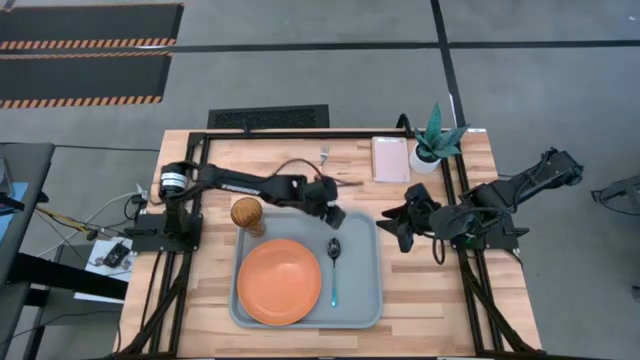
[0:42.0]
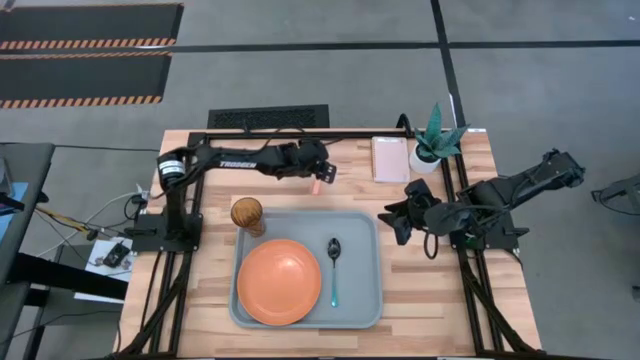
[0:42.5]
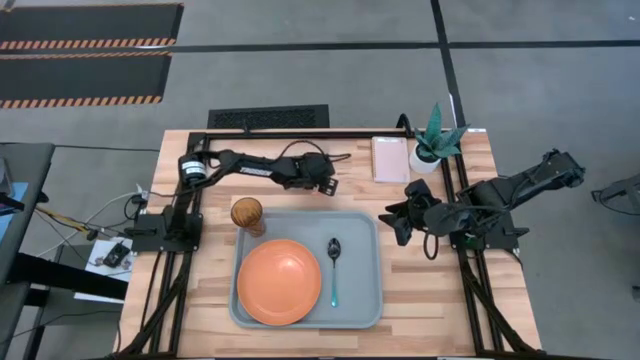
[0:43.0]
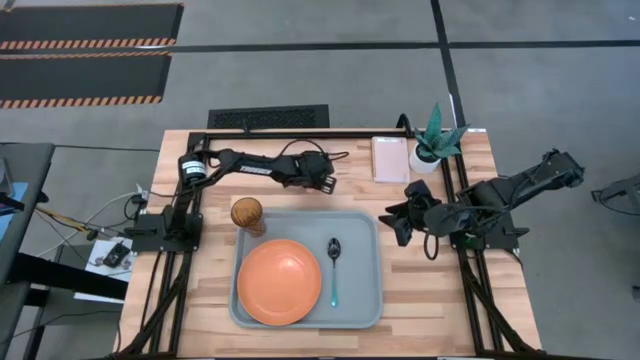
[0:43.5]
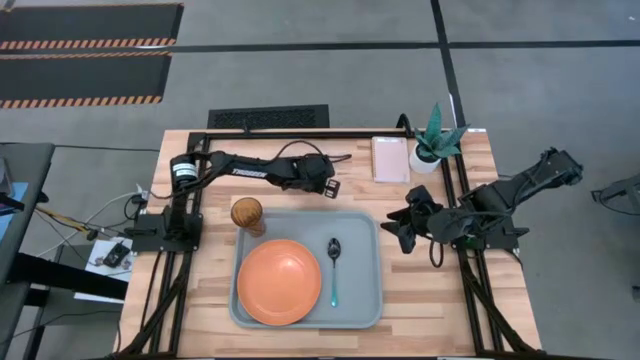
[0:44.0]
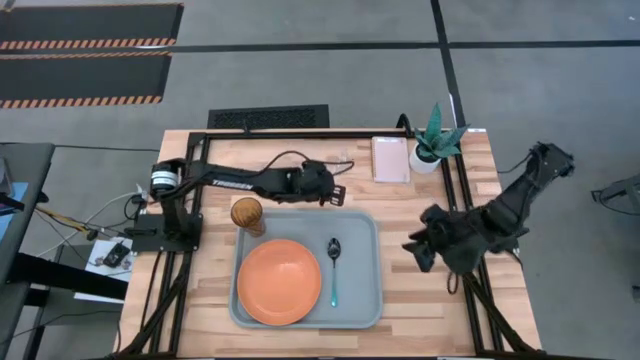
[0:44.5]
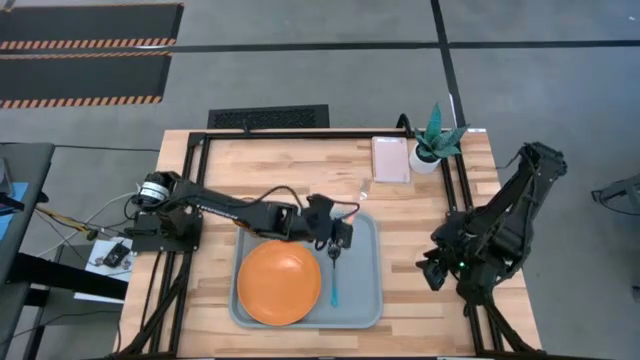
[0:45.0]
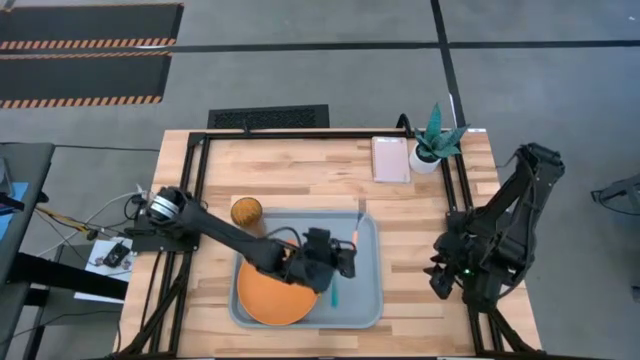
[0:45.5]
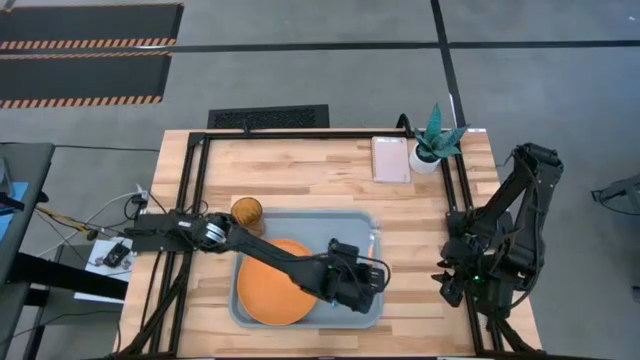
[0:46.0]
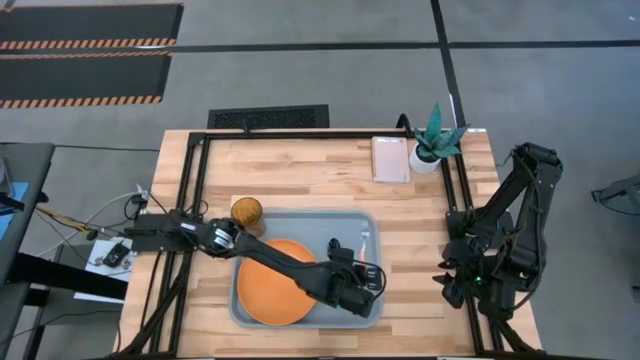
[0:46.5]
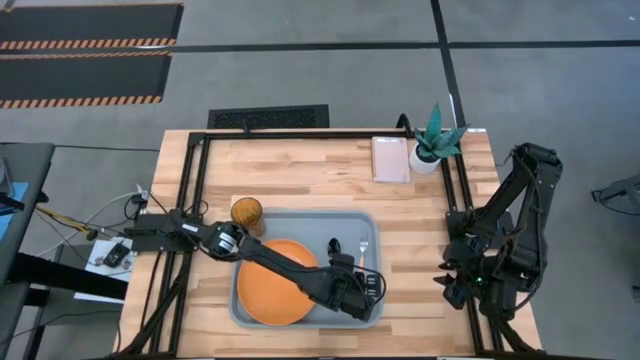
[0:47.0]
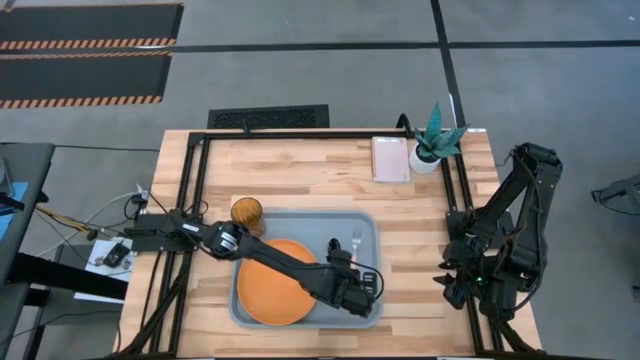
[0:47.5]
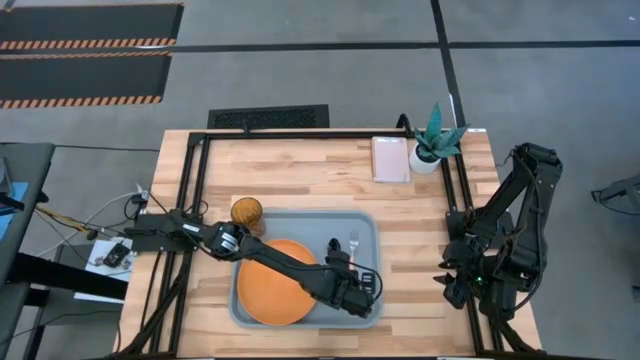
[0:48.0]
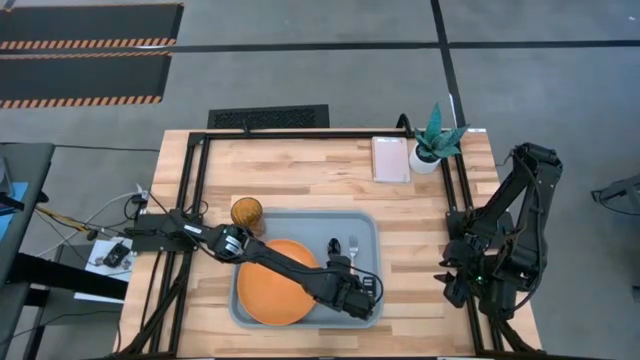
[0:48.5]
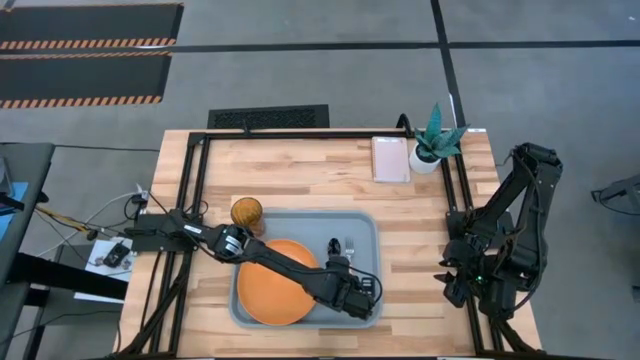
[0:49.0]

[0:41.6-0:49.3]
Task: Pick and place plate/cup/fork/spoon on tray
Put the yellow fork on the gray tray to the right of the blue spoon

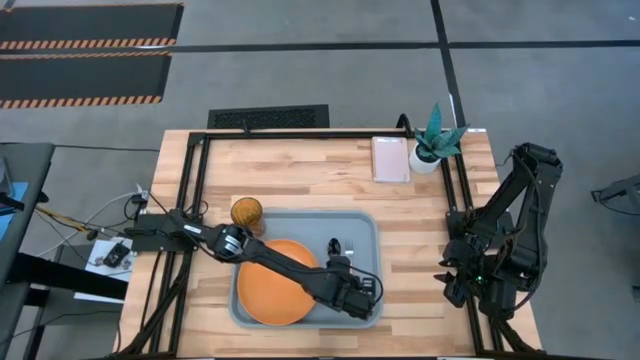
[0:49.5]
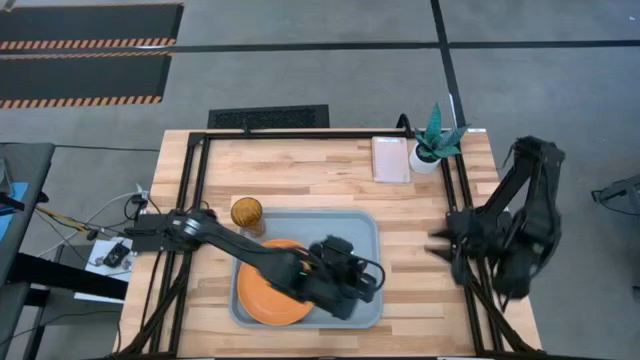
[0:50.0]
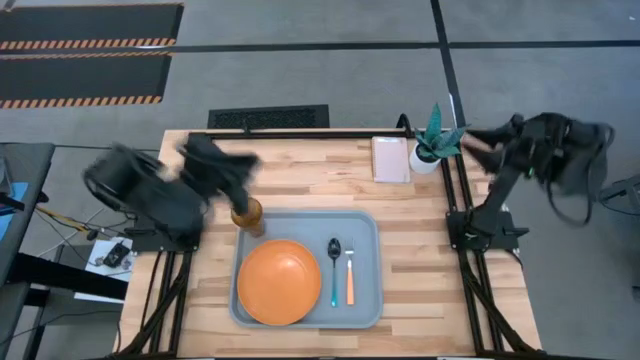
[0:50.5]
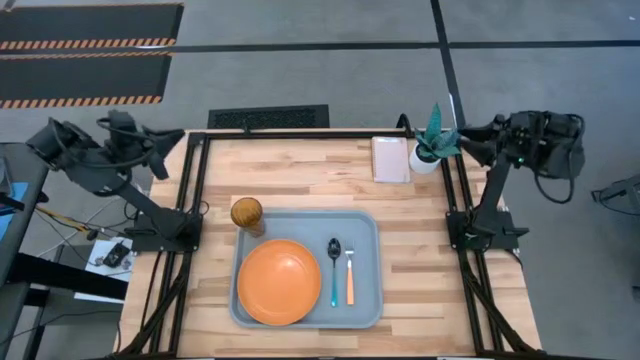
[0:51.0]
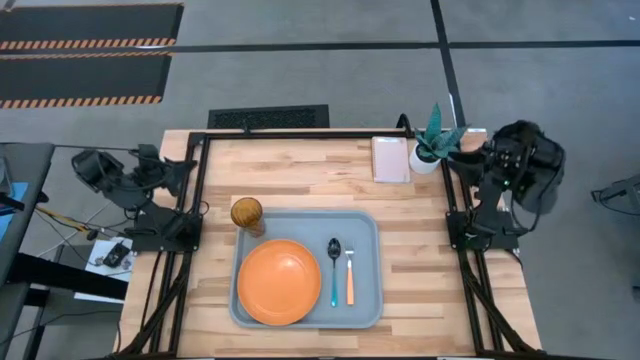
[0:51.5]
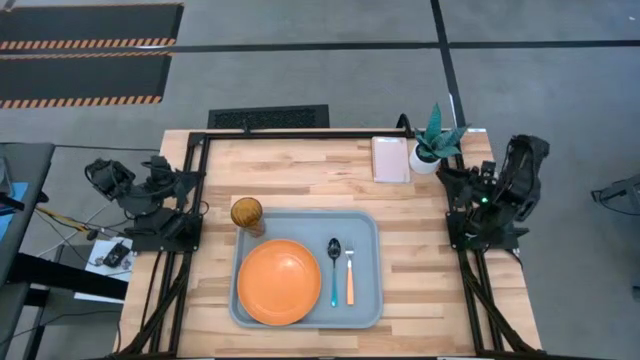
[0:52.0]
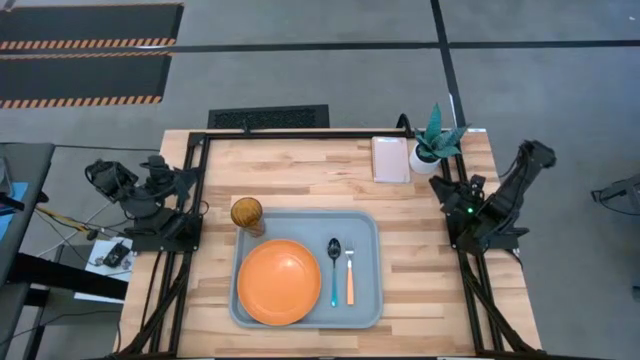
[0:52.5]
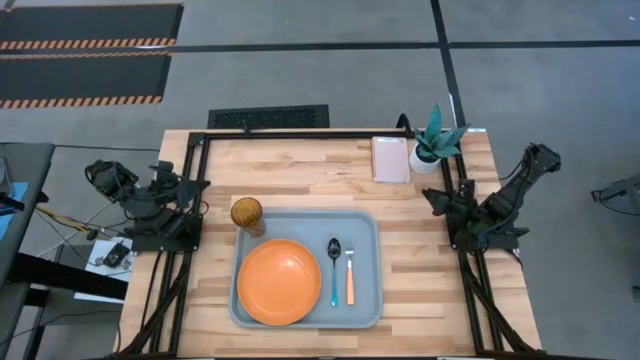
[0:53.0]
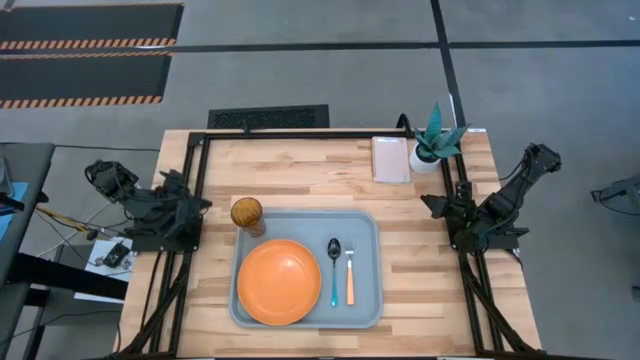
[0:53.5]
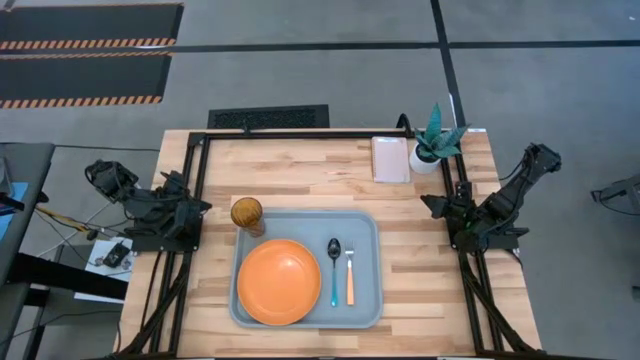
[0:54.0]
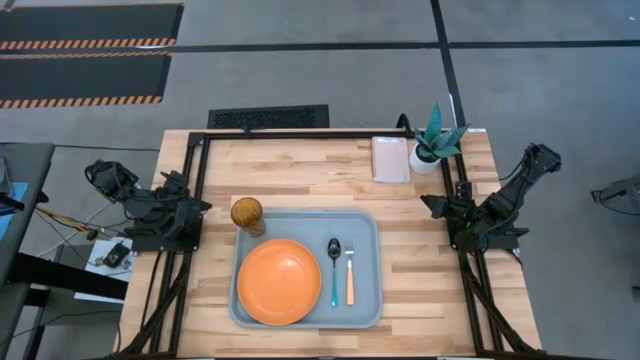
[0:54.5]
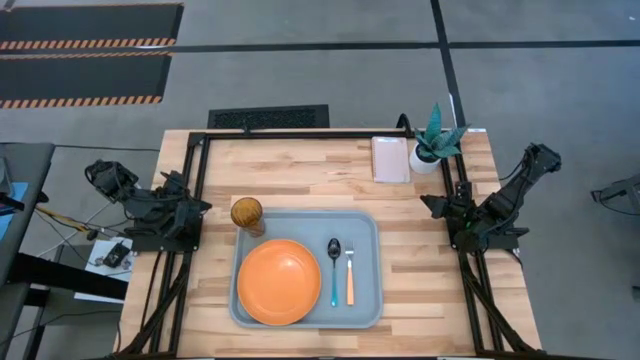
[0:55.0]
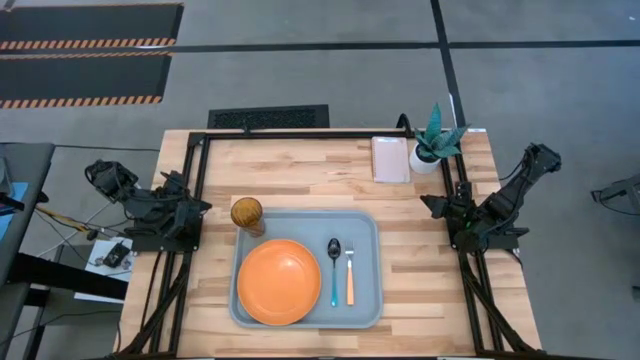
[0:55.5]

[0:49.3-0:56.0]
Return to Home Position

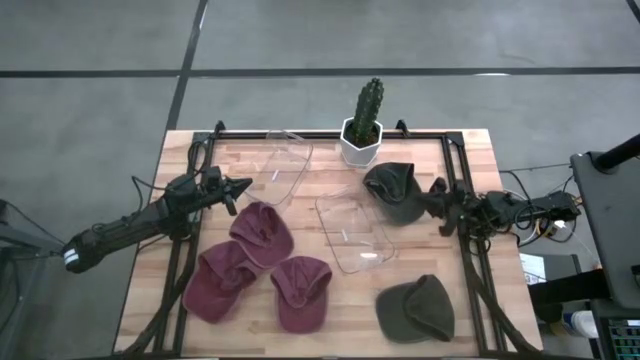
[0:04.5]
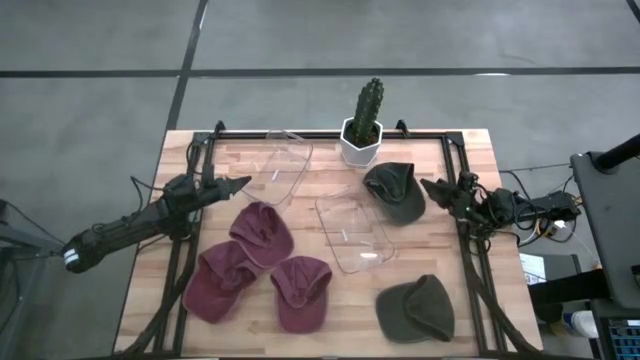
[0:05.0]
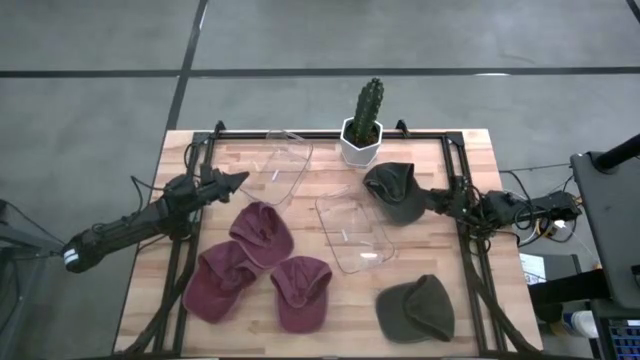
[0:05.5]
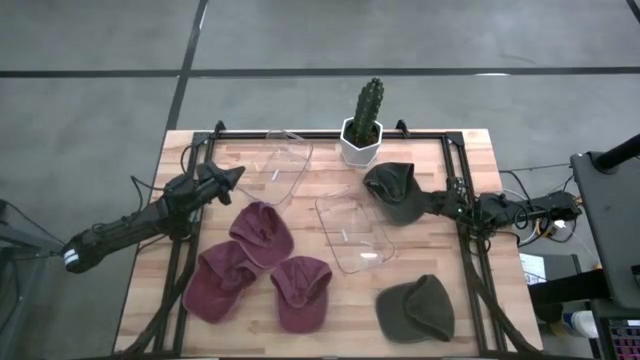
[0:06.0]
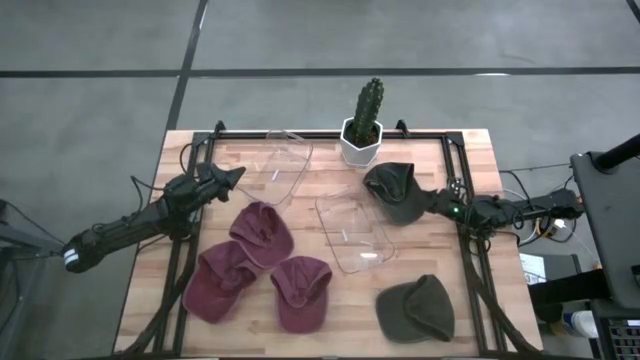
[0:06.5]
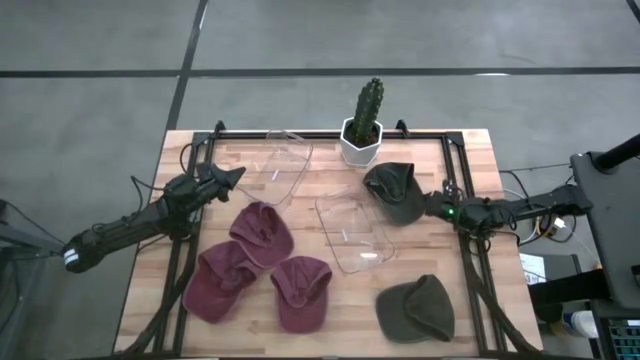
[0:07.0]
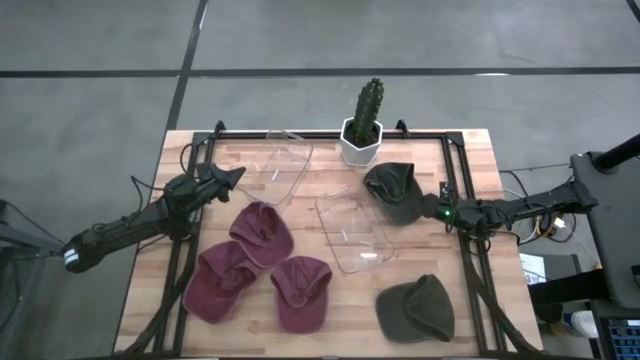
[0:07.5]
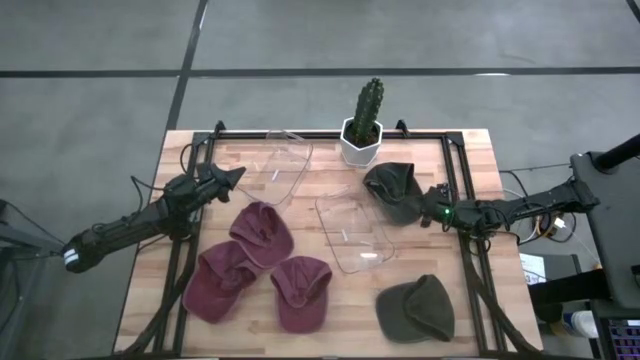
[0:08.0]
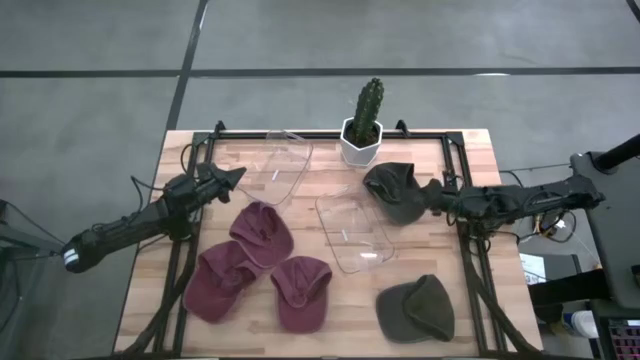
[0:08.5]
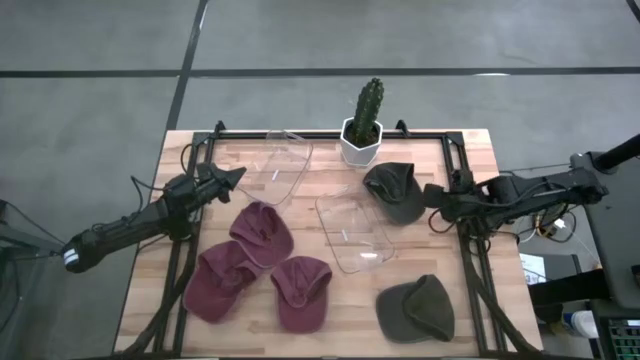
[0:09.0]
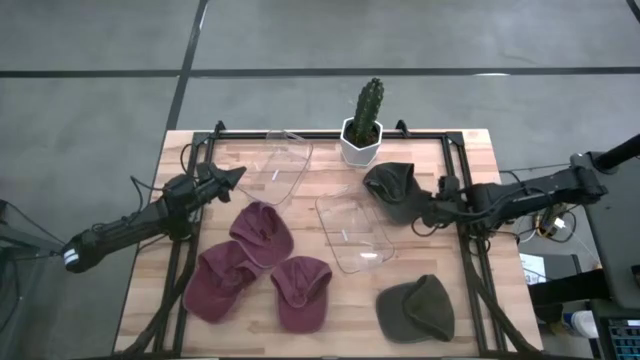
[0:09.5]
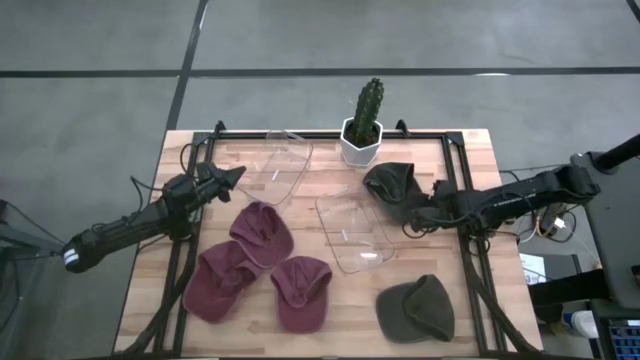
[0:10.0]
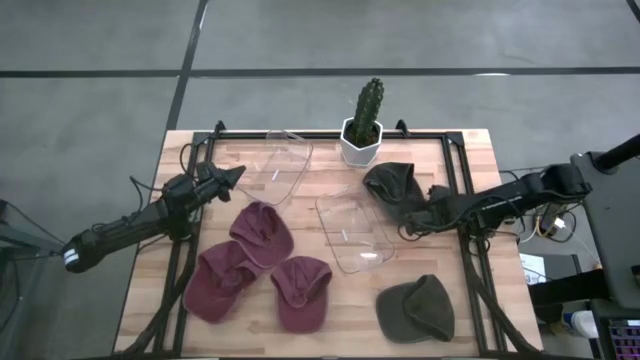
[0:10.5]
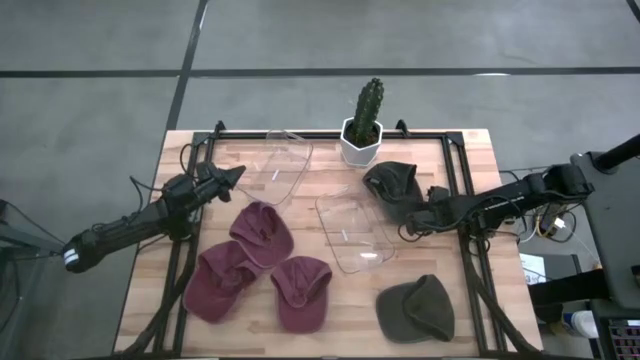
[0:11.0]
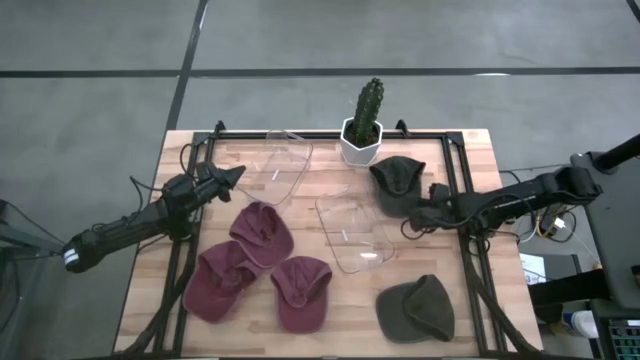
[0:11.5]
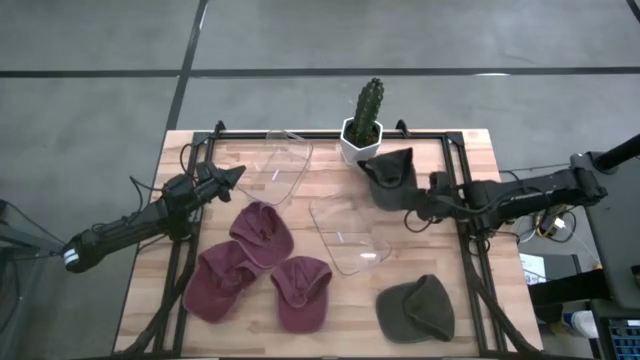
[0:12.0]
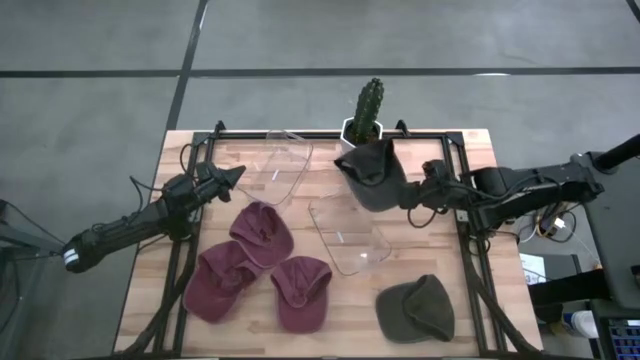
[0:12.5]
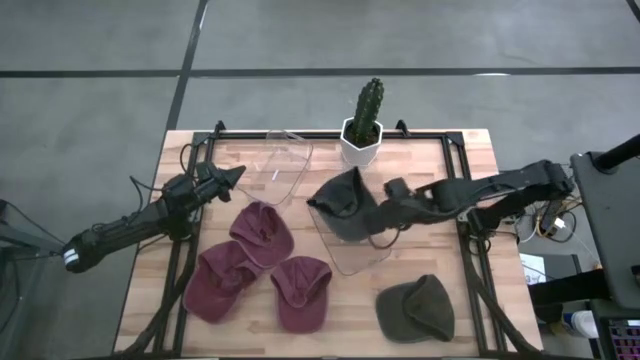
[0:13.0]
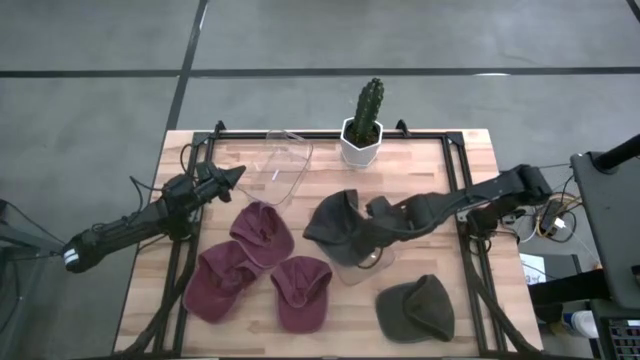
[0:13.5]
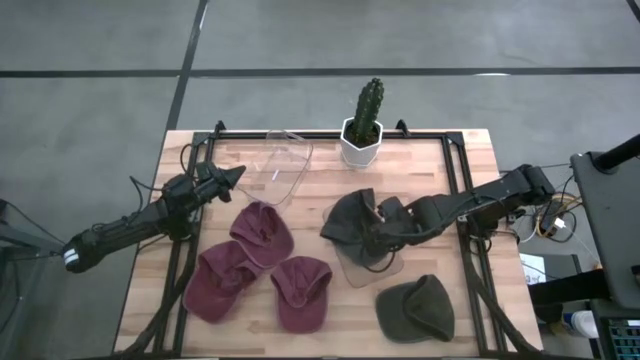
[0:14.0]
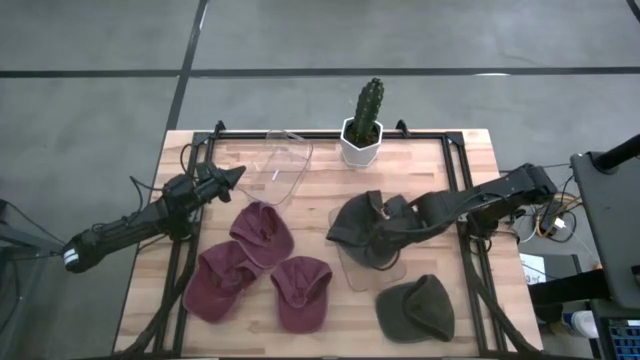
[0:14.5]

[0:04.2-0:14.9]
Task: Pick & Place hat
Put the top black cap into the bottom transparent bin
